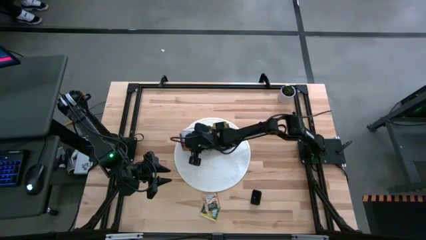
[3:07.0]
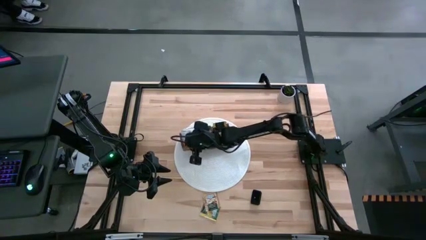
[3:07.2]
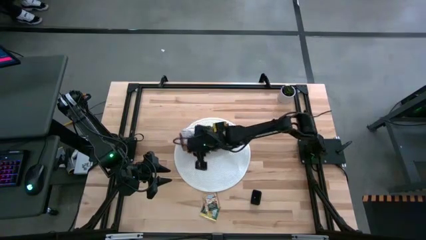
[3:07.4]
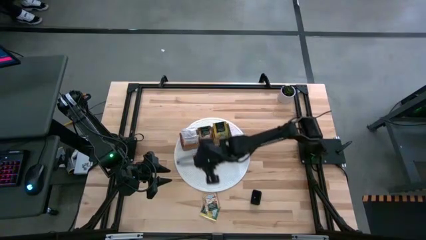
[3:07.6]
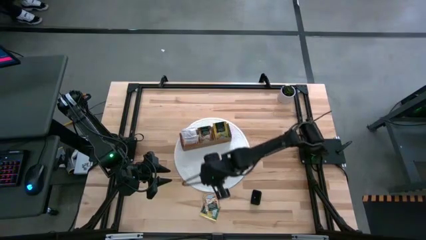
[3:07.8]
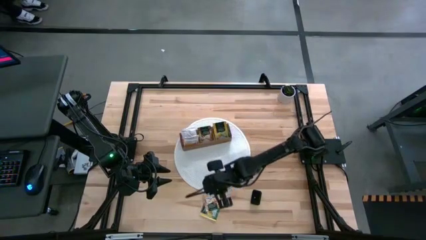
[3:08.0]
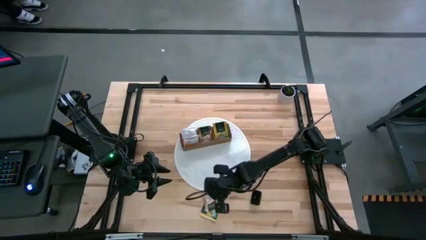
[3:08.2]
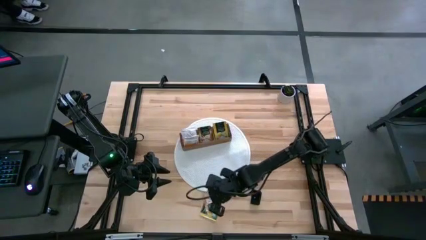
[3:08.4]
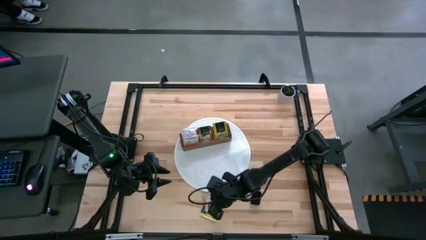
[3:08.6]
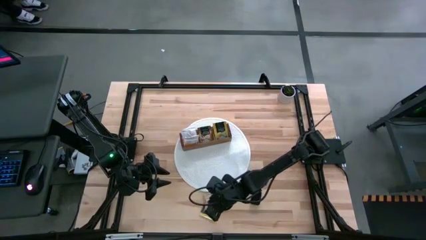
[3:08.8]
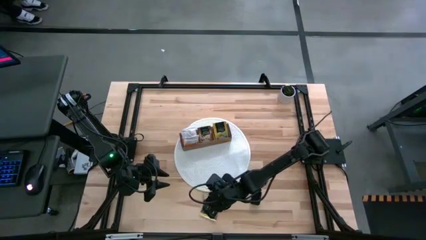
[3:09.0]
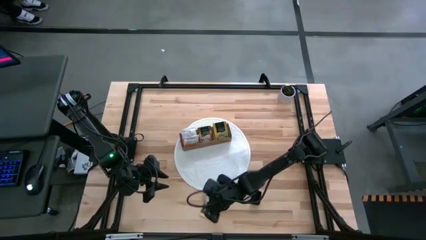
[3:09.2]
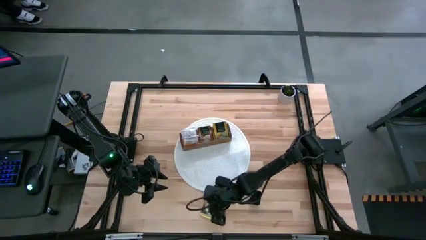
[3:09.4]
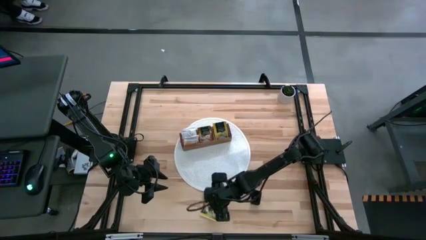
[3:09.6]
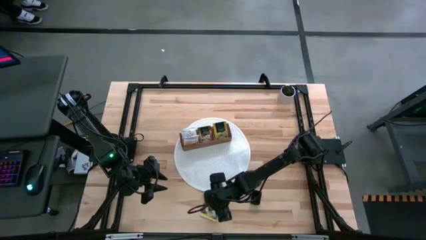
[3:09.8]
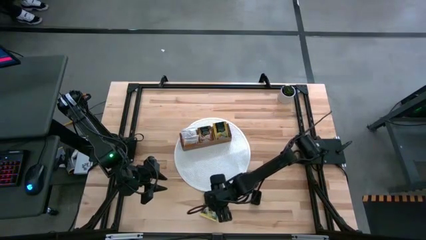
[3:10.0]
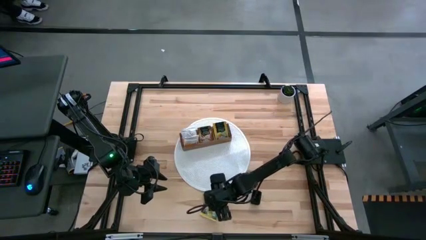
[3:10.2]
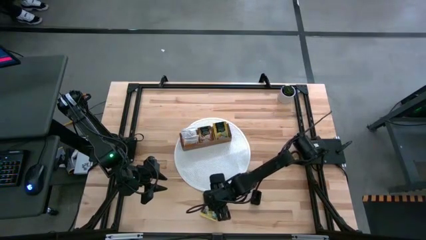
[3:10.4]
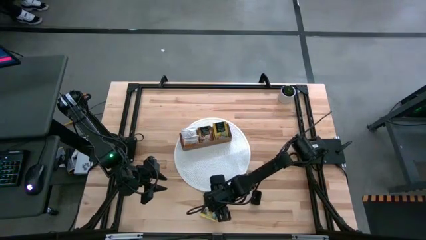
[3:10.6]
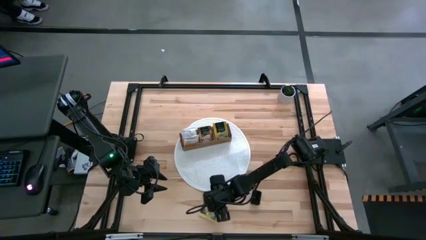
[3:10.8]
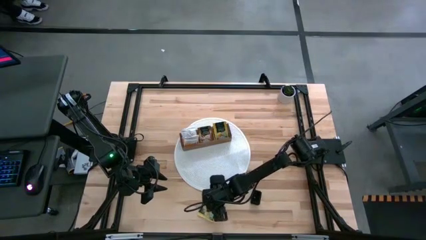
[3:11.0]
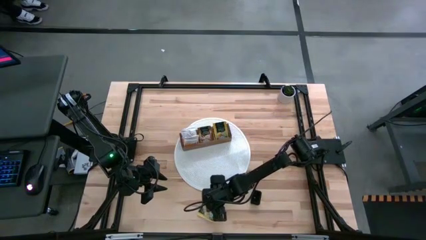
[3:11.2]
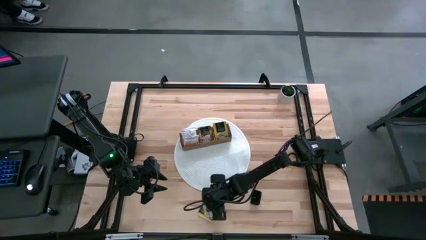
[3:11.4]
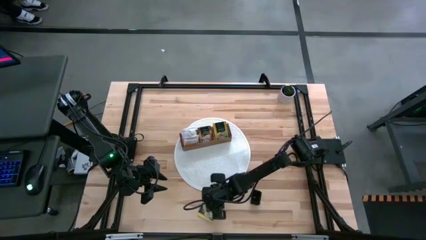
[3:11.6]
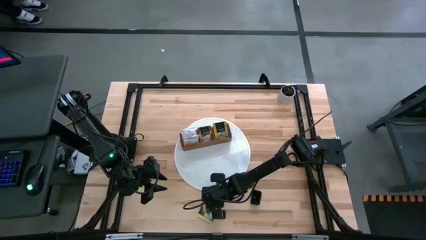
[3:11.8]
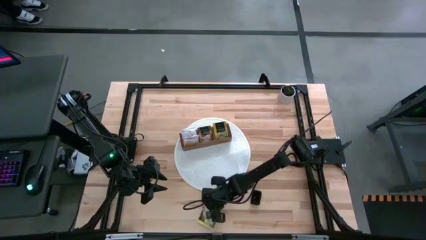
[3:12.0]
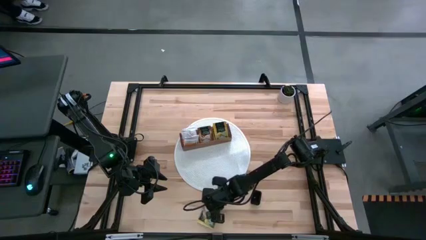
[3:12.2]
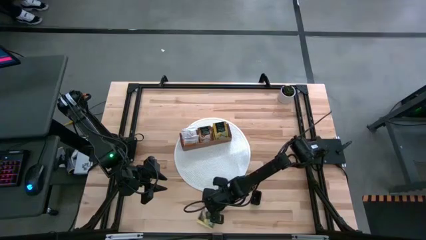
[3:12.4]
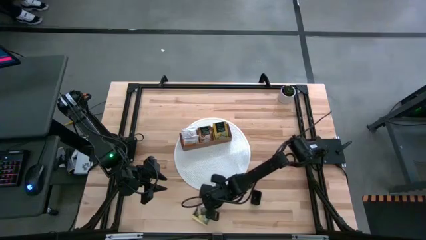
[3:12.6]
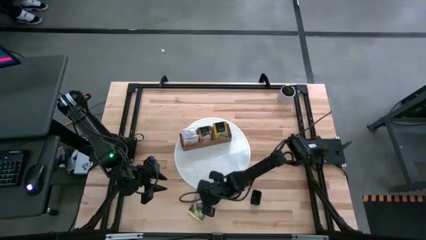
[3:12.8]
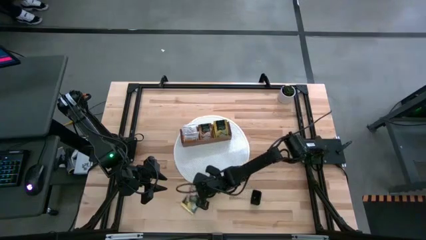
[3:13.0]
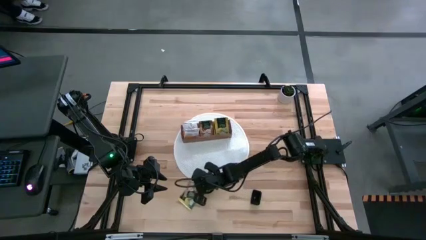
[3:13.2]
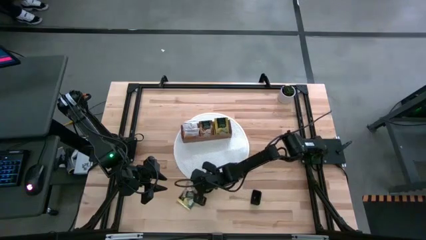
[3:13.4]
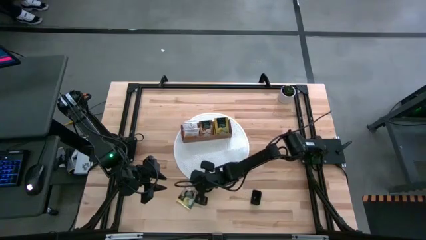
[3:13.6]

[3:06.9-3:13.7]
Task: Pick & Place Tea
Put the brown tea bag into the middle section of the wooden organizer

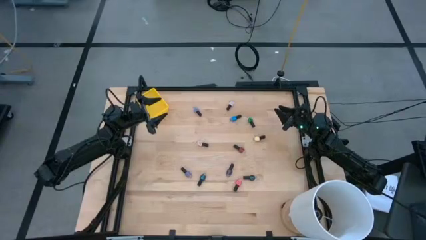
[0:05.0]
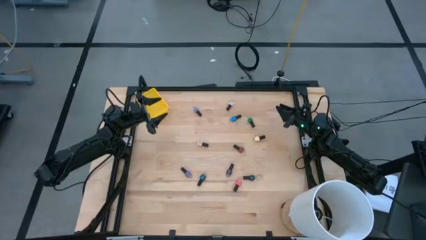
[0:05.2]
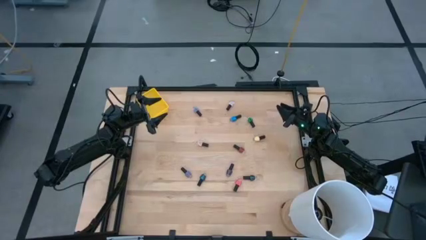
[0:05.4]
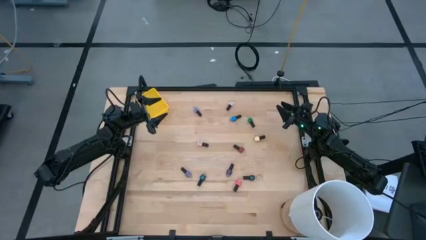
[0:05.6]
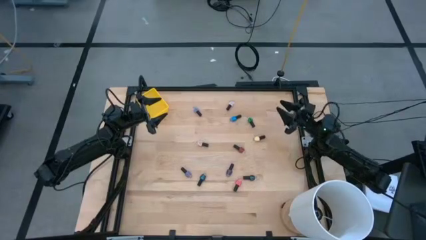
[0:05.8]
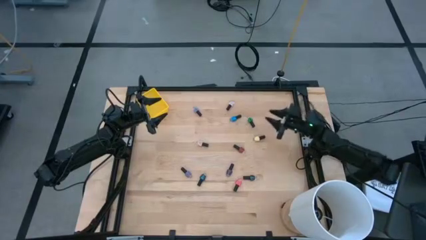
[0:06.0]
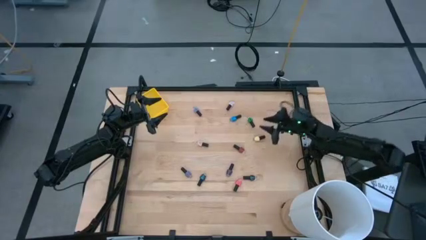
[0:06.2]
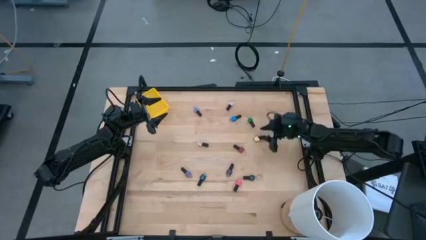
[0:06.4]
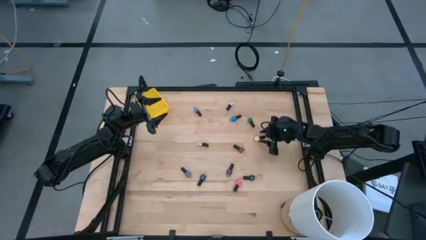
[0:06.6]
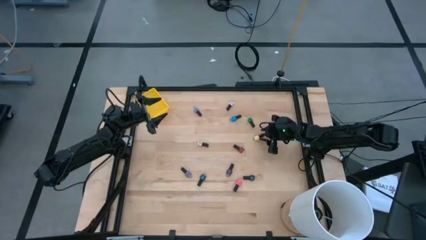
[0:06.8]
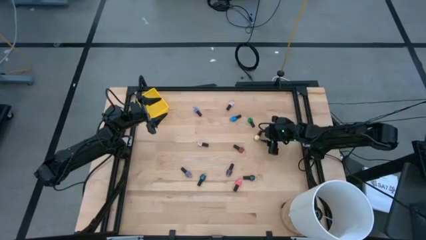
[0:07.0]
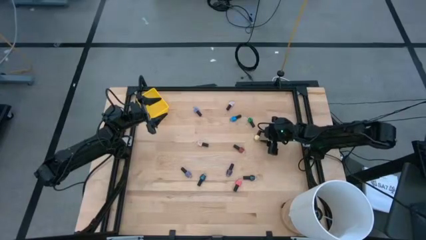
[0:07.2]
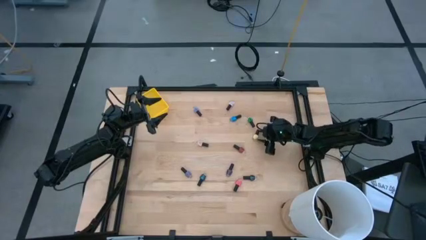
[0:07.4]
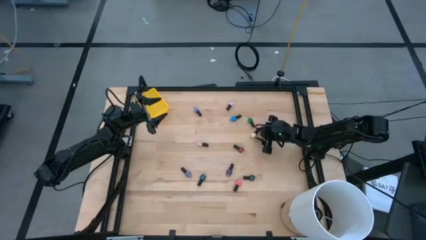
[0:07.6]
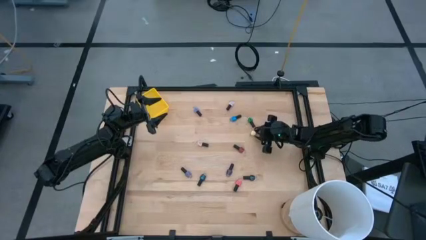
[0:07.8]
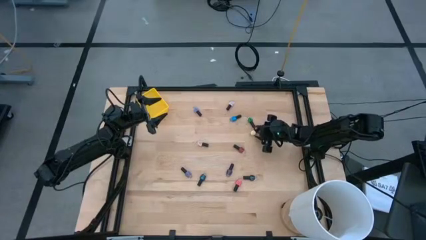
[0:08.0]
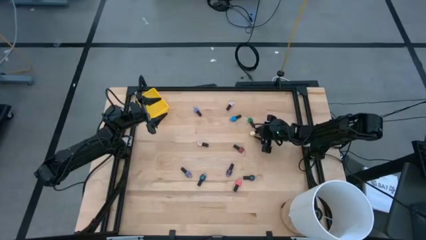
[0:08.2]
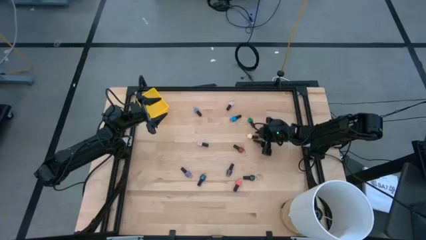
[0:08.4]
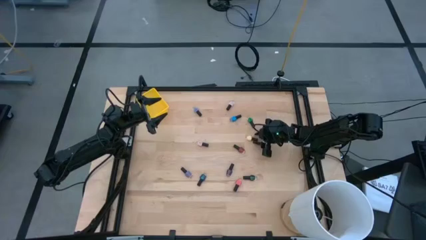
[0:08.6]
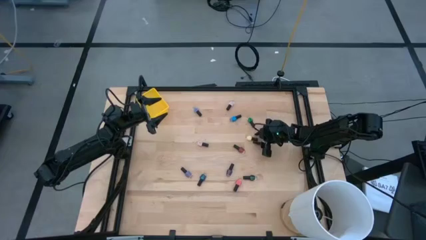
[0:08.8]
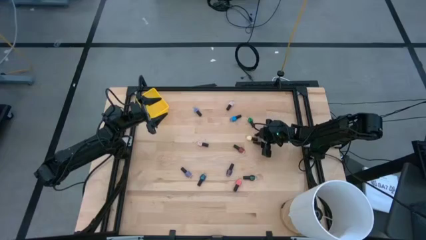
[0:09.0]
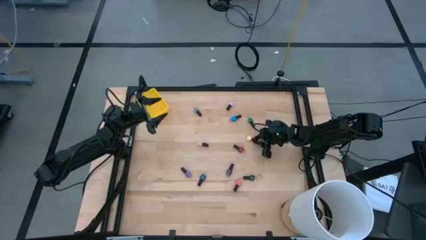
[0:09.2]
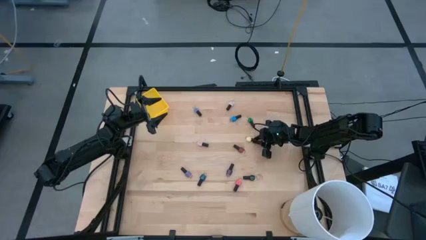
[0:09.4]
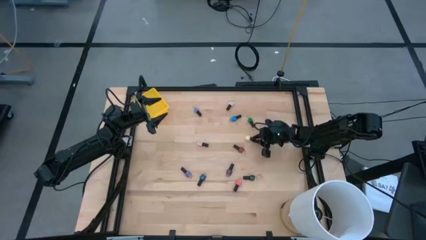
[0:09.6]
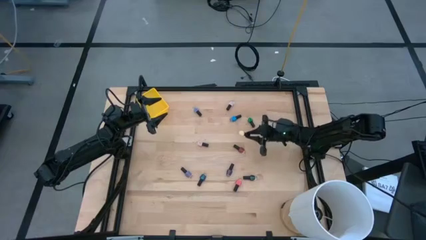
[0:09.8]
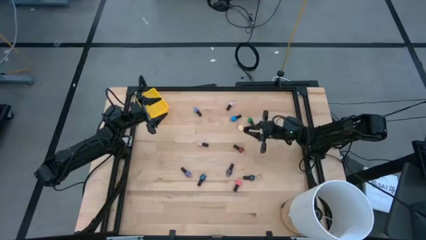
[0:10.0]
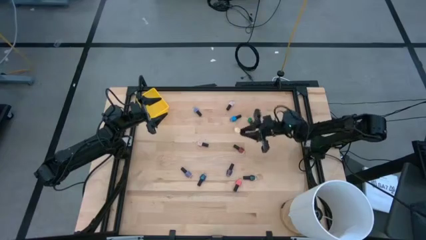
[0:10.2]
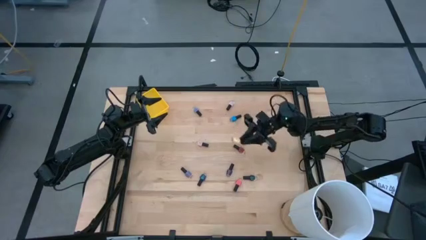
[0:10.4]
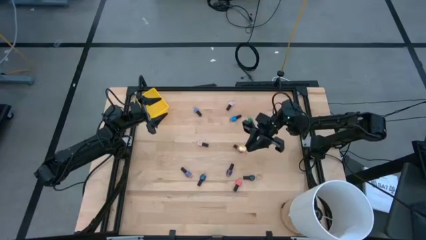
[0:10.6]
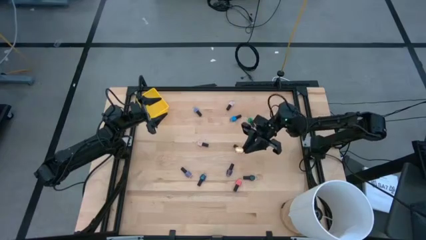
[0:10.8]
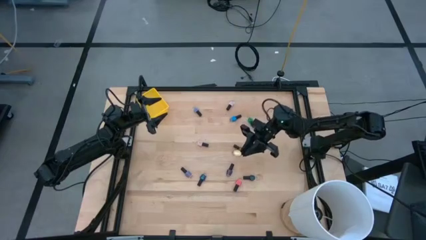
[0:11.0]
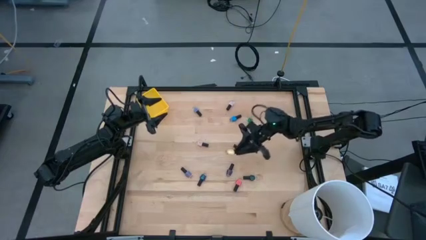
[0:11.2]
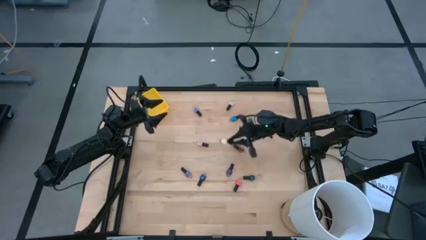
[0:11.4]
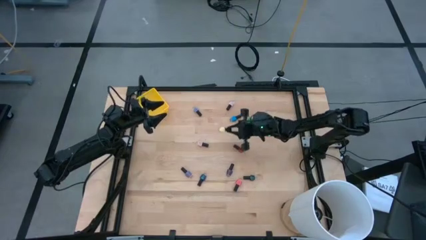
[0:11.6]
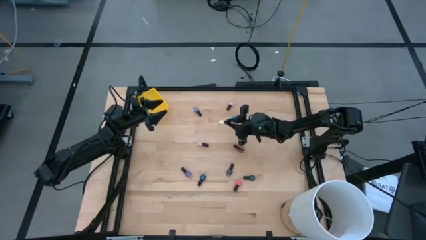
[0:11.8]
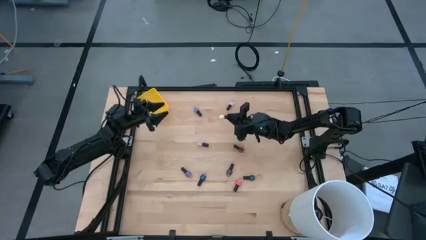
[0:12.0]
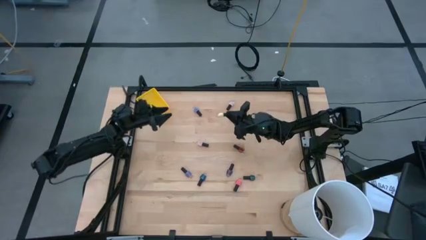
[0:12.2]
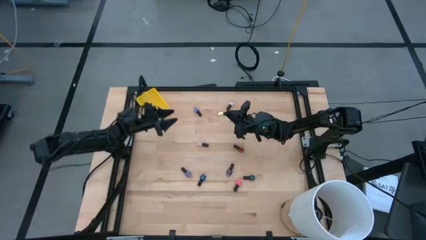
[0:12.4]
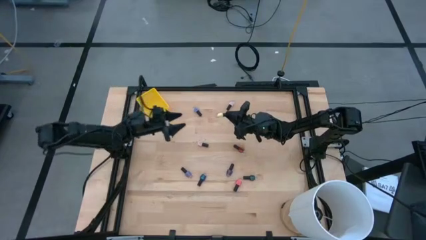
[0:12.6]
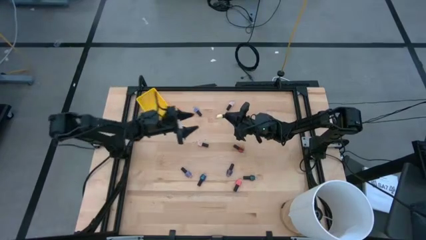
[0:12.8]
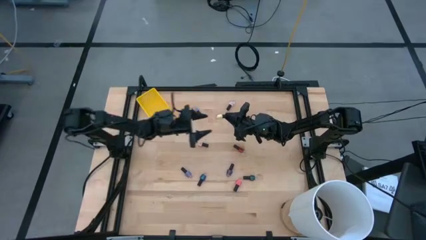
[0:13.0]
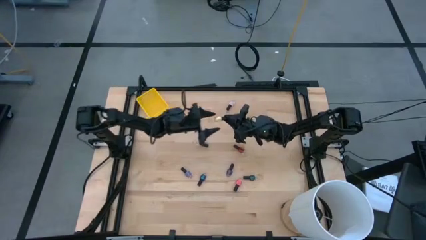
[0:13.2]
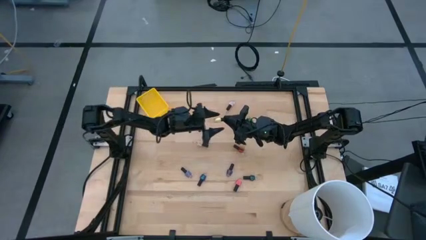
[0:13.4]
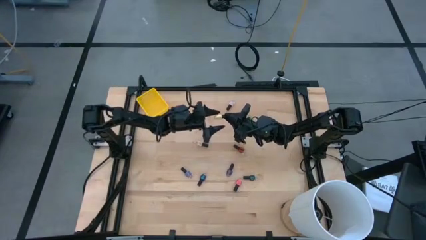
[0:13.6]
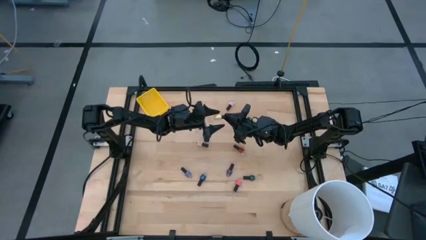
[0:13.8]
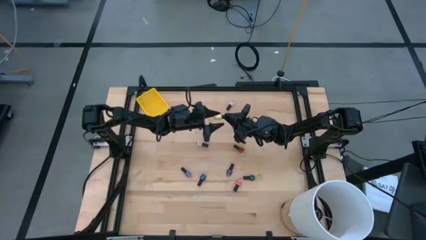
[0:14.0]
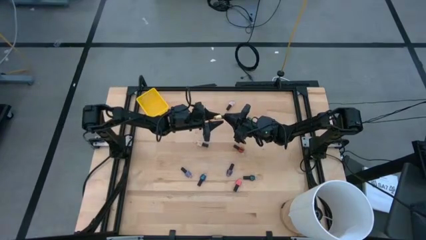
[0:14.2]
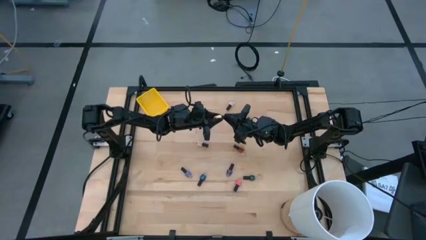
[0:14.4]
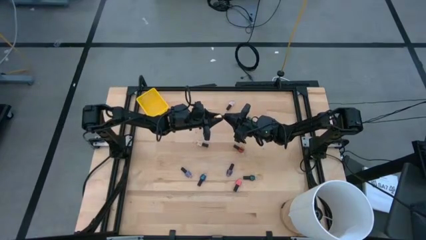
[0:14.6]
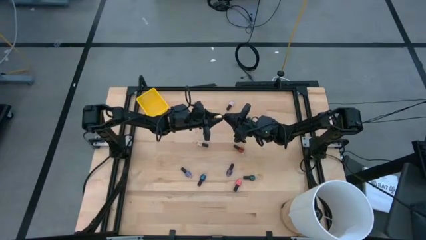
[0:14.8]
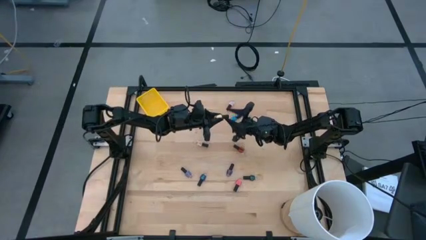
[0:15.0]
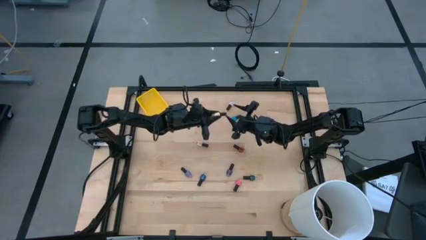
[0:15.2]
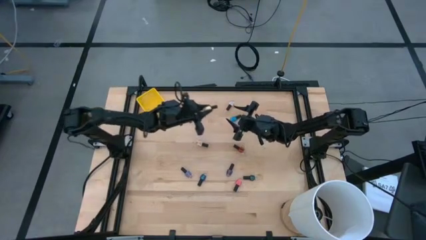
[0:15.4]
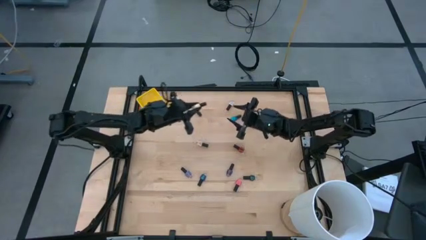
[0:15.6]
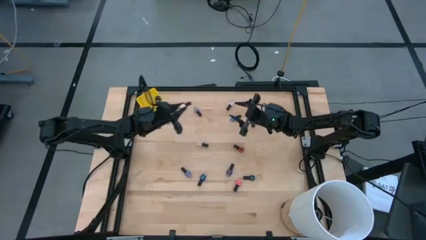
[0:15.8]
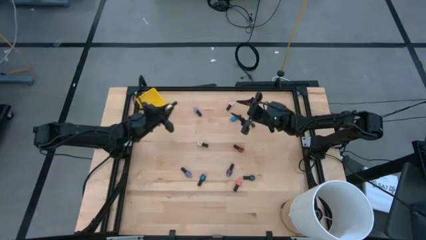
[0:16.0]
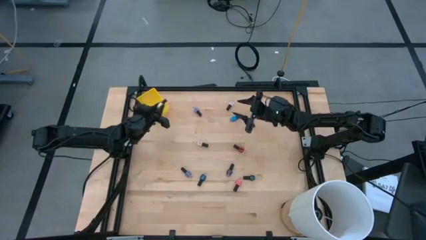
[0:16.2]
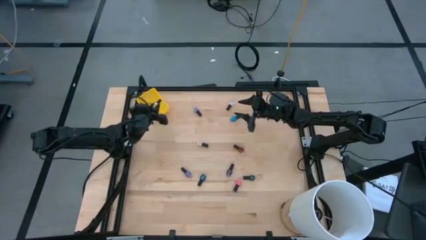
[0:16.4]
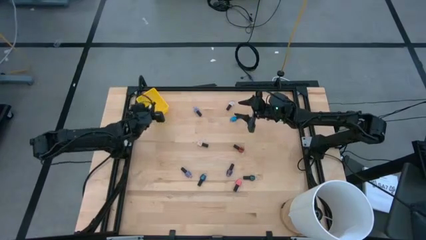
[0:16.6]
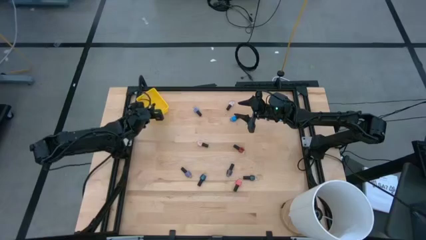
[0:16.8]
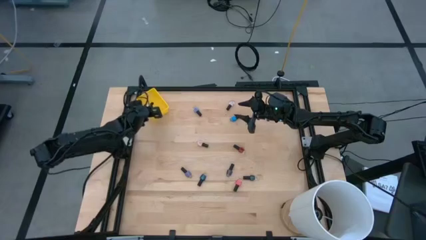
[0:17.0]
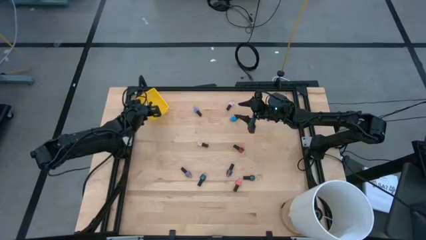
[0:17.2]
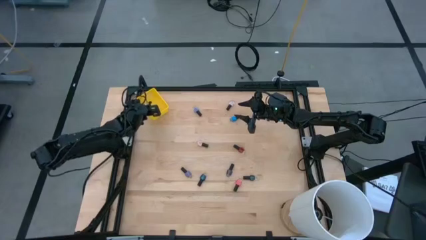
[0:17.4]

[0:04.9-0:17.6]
Task: Pick & Place Nail Polish
Put the yellow nail polish into the yellow bin
